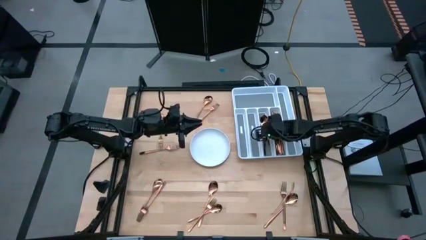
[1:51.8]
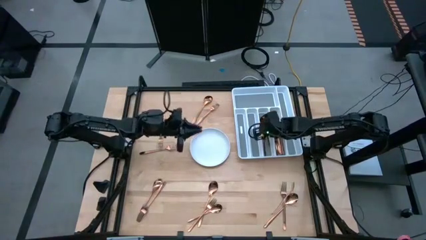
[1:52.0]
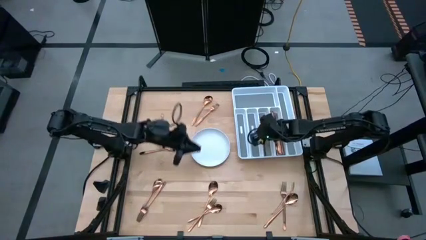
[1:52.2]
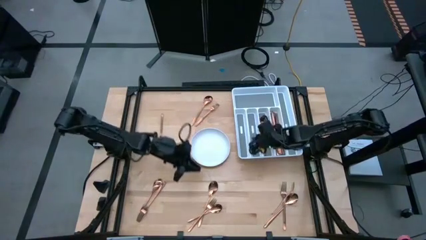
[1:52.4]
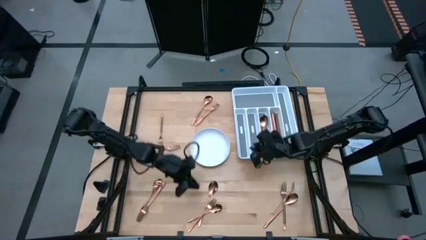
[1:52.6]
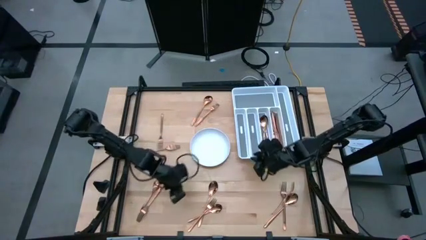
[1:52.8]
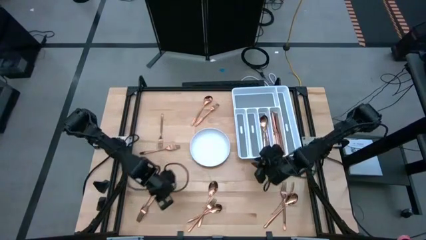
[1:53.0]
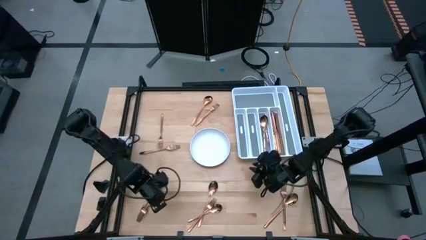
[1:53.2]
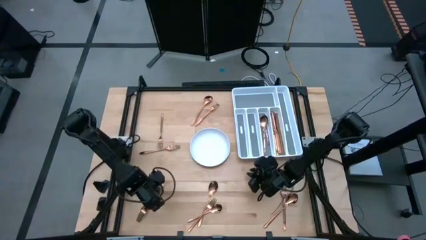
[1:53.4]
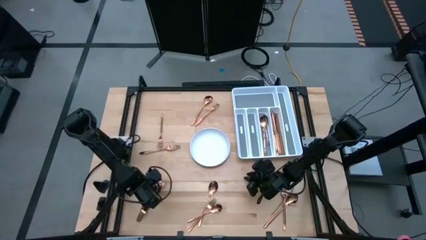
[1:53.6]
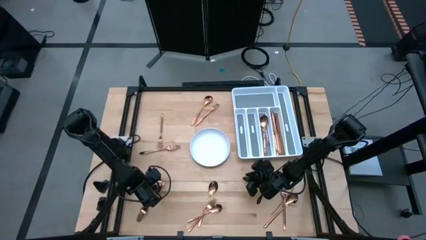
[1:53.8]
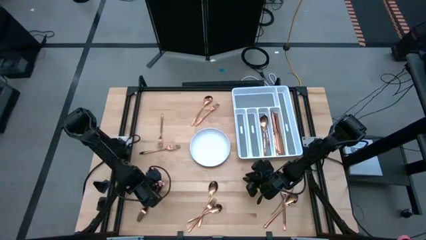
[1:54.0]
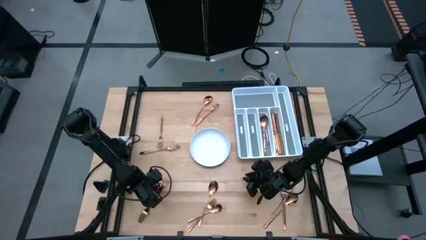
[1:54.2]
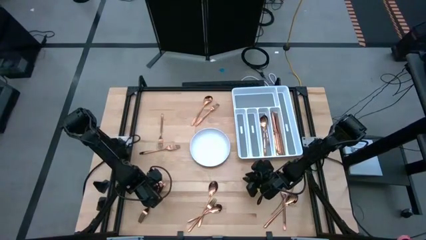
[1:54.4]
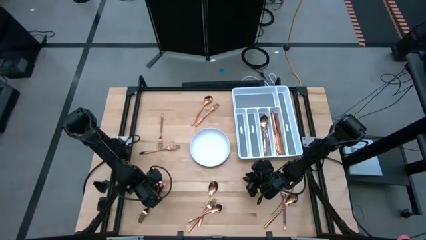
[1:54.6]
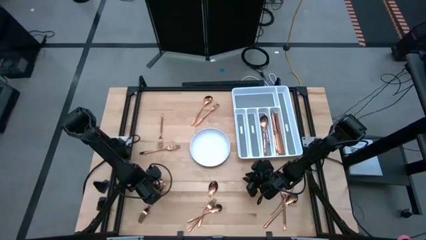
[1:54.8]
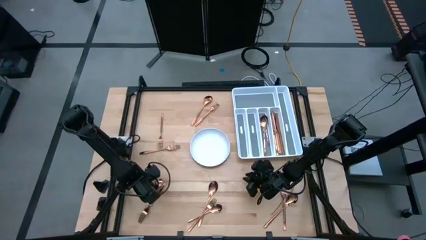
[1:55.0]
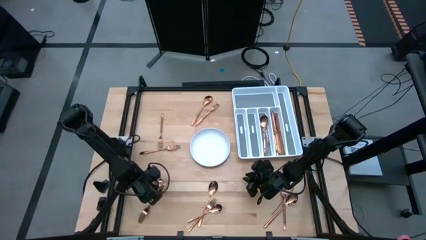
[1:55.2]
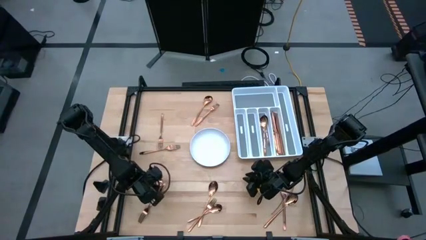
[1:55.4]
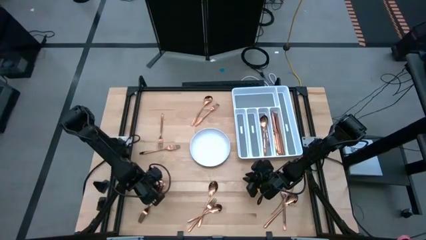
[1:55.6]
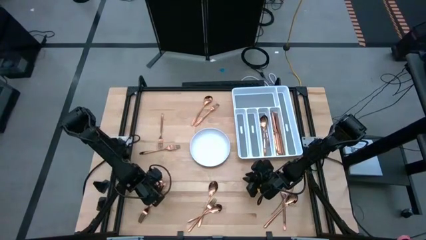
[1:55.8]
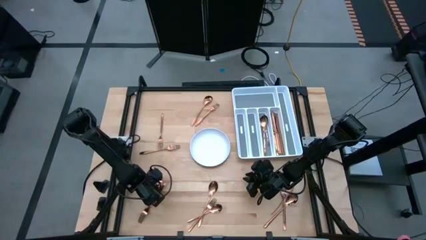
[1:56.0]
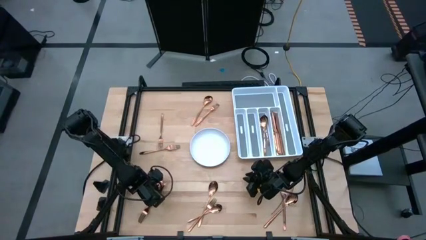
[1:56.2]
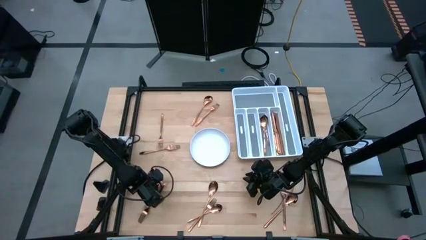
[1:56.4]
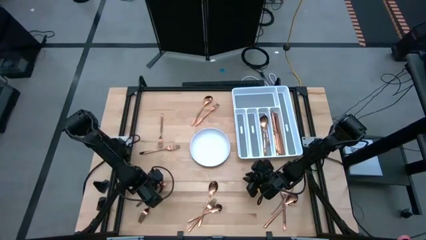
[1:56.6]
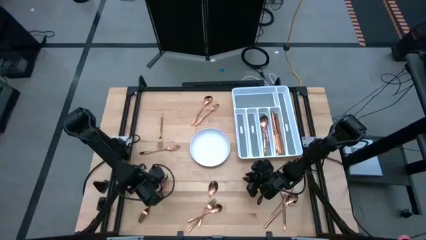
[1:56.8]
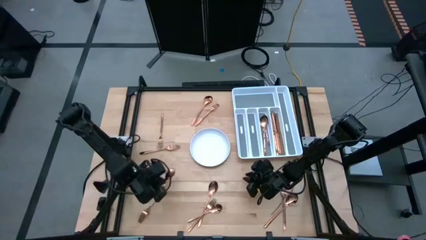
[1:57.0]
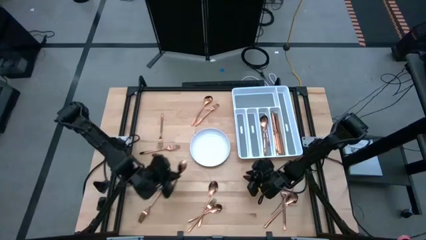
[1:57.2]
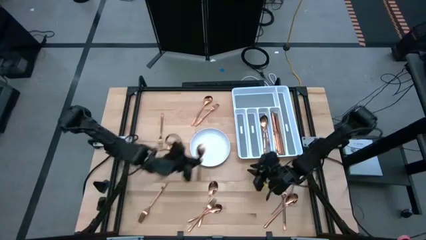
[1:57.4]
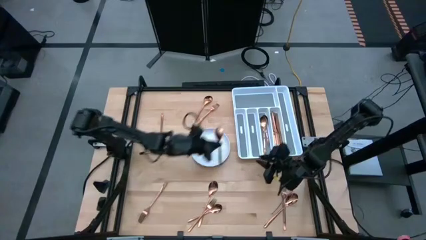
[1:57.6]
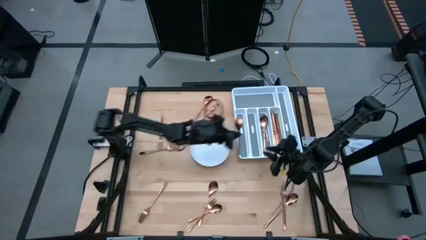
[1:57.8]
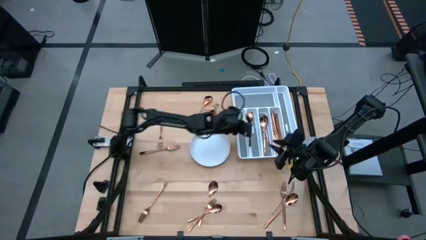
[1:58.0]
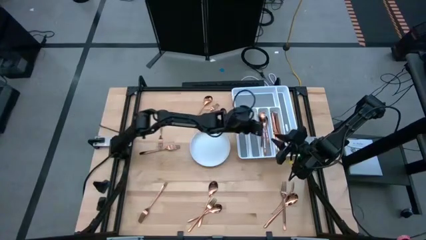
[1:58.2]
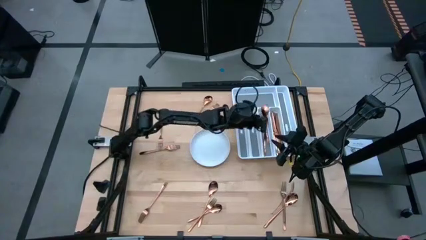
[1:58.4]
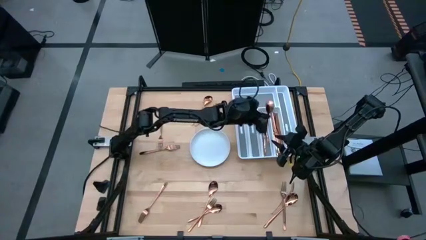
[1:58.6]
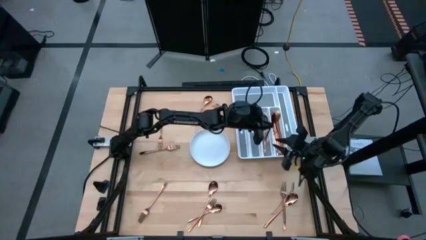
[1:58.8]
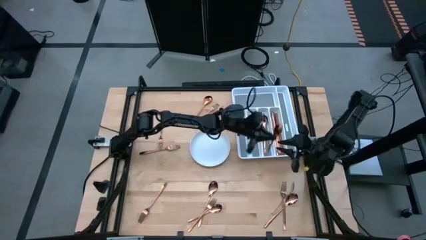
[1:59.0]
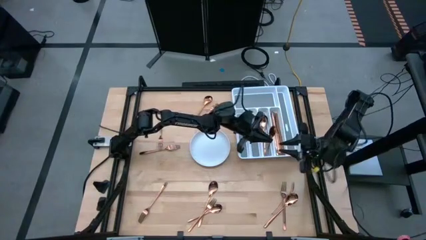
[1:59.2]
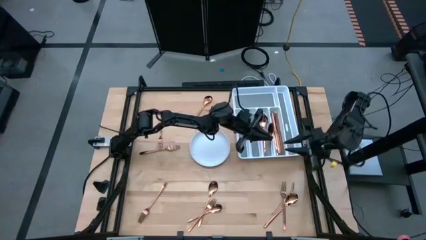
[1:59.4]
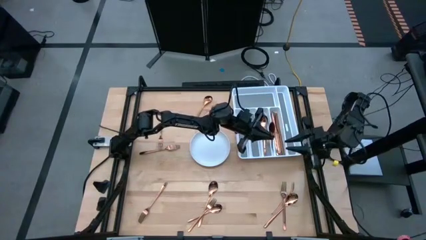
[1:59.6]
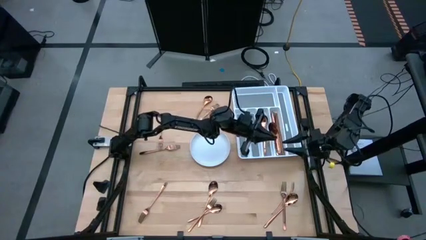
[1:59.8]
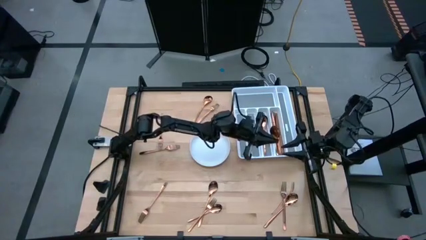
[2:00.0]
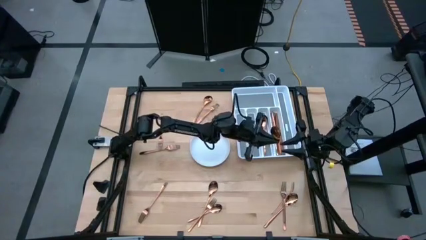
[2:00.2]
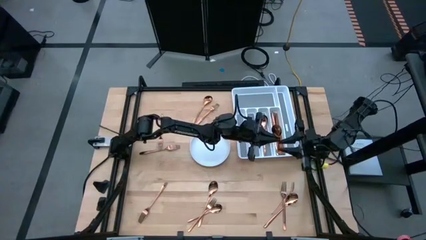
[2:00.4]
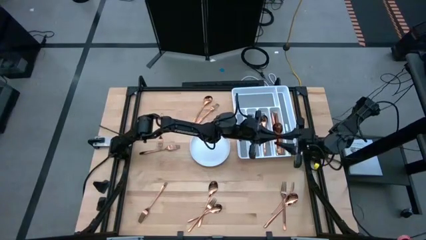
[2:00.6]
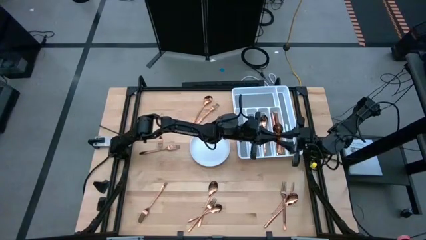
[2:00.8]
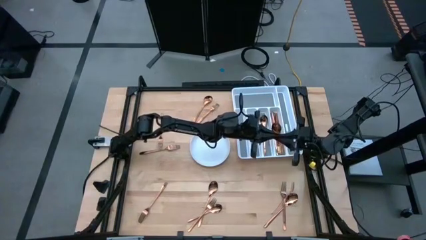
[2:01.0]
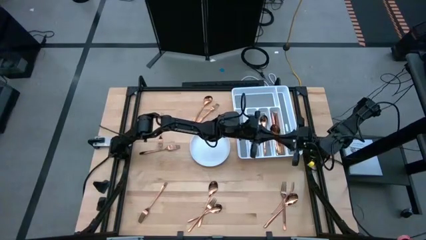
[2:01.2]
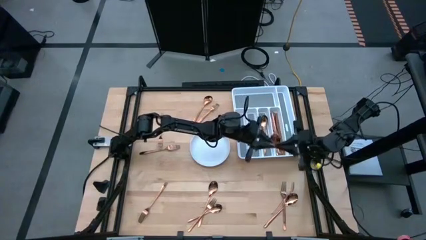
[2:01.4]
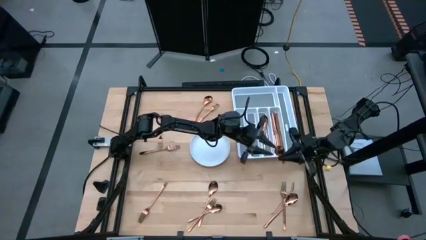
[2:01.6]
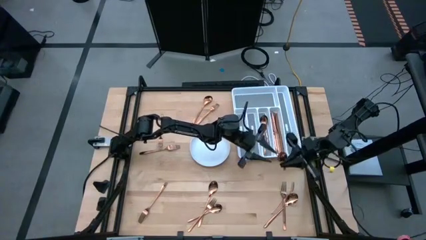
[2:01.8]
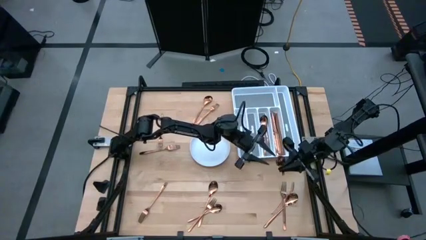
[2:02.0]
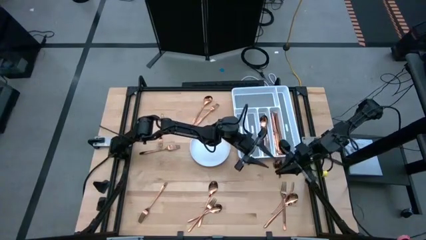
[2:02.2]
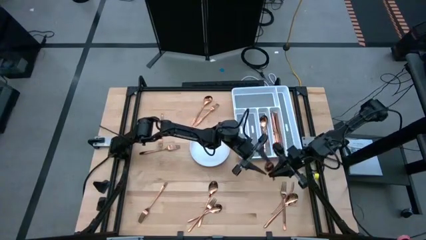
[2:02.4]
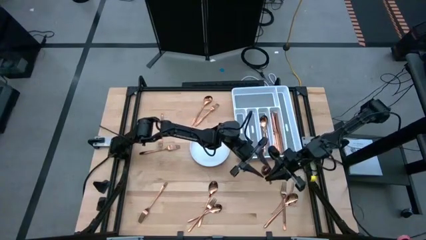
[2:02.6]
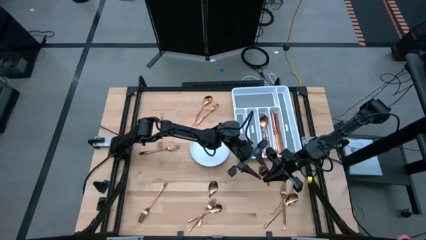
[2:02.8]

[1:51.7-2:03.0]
Task: Sort silverware
Put the spoon in the silverware tray

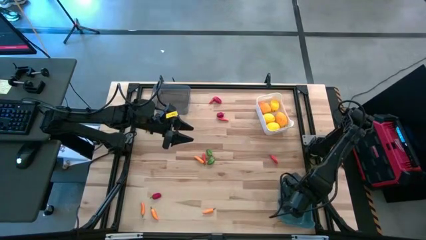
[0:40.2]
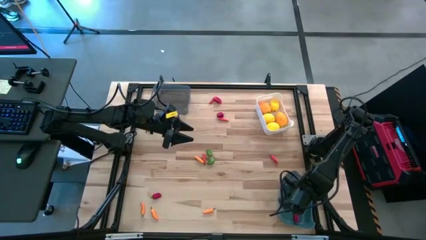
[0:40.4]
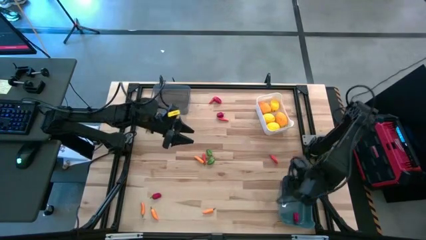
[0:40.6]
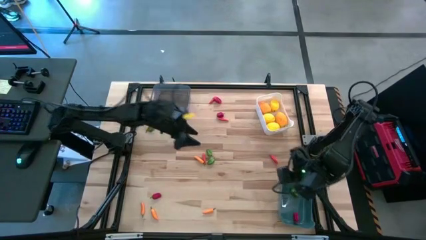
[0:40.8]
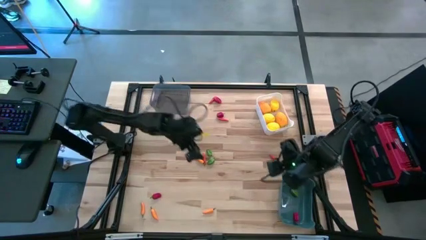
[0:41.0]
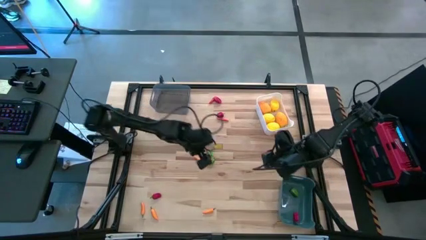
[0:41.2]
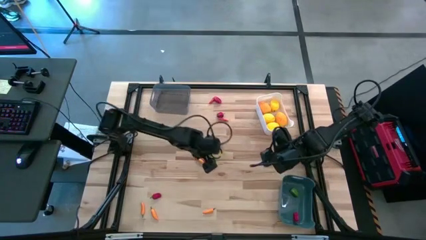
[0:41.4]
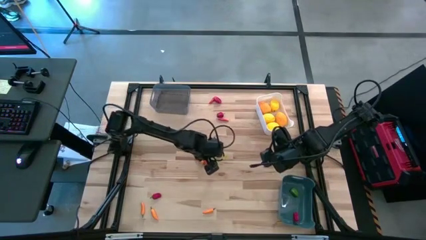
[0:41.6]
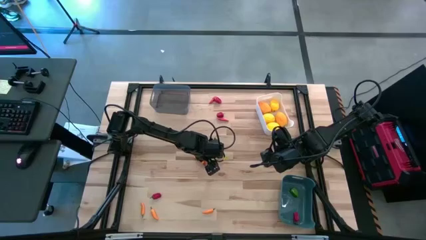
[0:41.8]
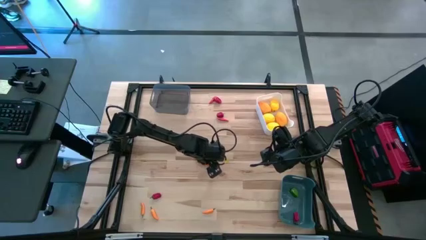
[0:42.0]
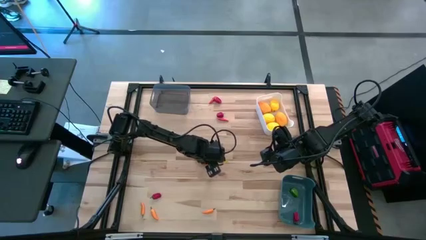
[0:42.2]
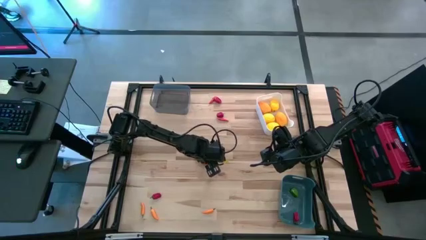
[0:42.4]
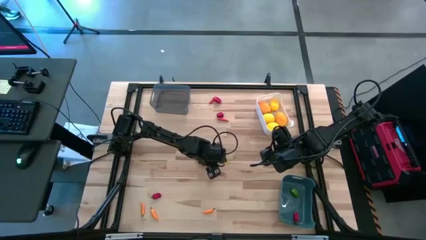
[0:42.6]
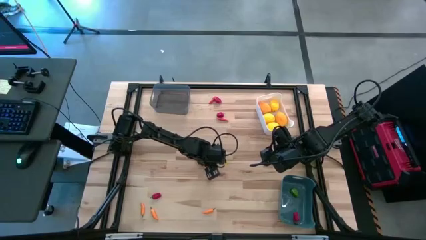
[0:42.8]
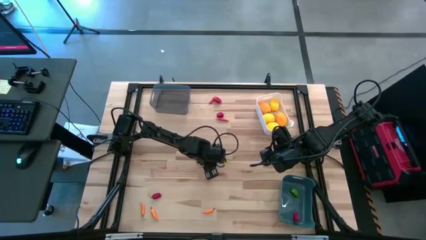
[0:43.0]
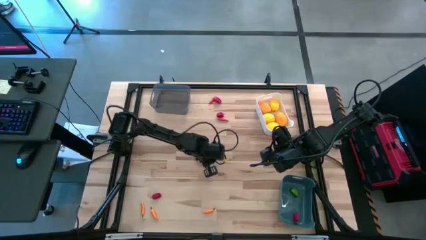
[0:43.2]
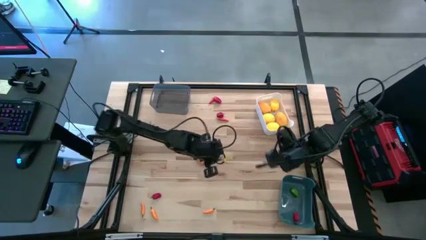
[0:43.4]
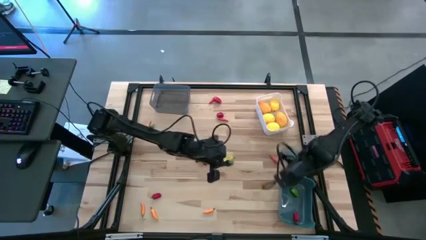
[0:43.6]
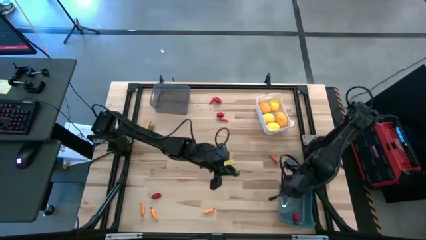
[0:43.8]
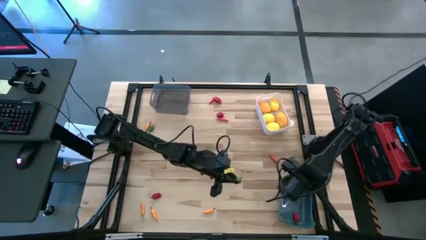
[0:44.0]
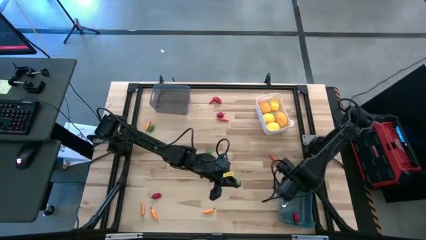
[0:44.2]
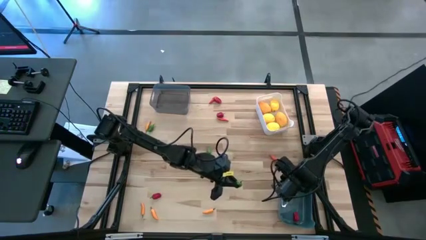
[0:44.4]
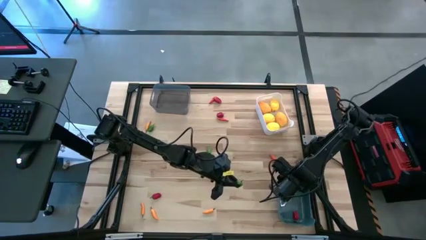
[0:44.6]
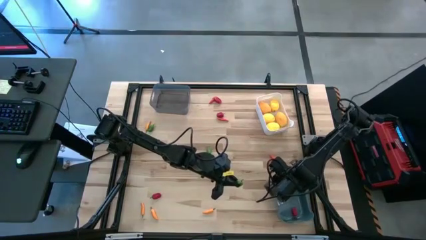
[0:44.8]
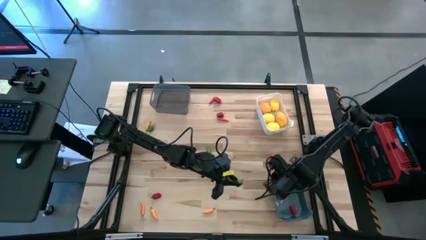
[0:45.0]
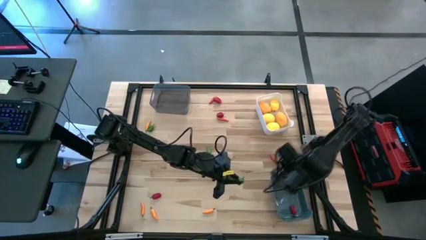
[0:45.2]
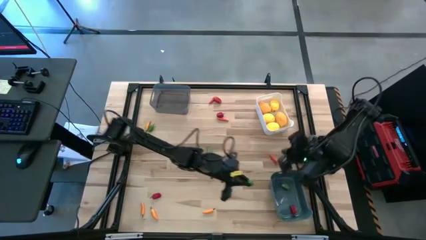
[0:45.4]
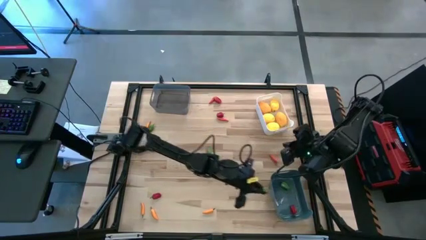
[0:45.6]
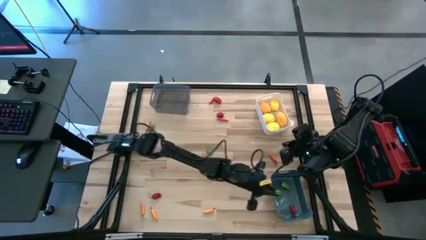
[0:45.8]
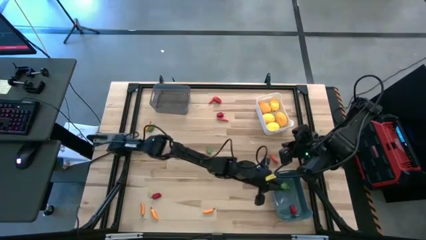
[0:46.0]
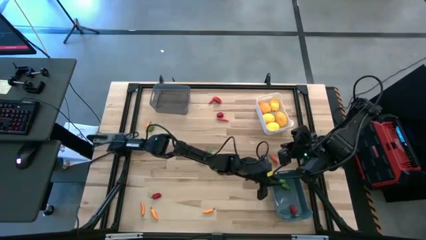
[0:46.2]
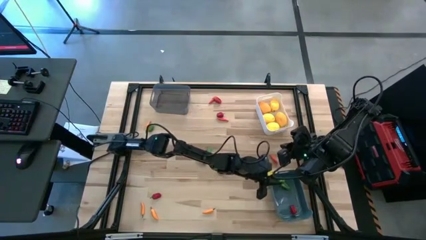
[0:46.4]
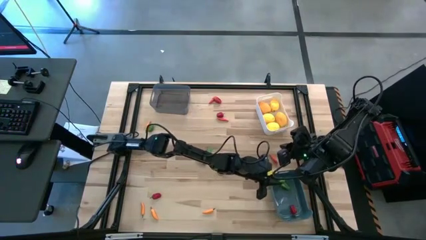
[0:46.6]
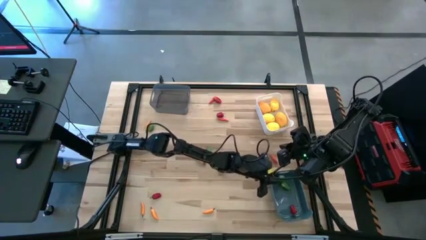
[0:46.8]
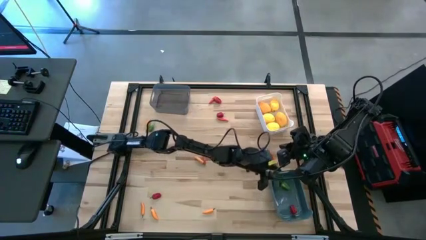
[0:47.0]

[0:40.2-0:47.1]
Task: Sort produce into baskets
Put the green chili pepper into the blue bin
